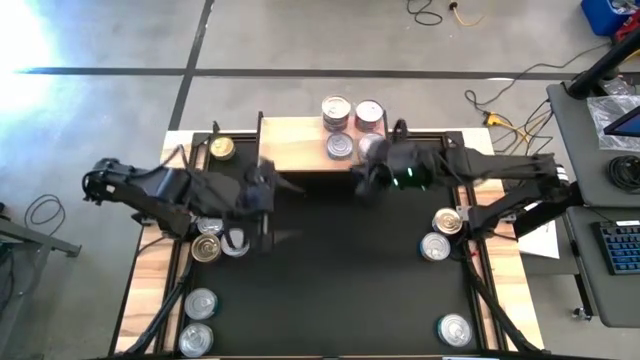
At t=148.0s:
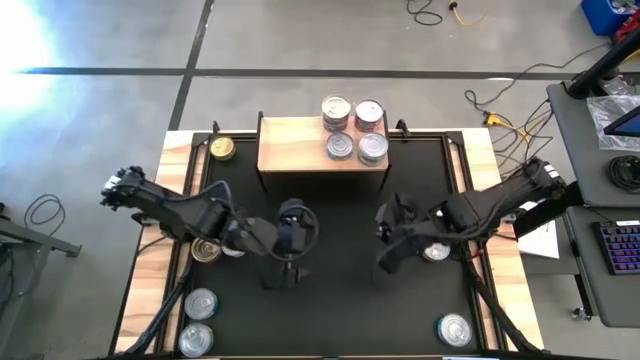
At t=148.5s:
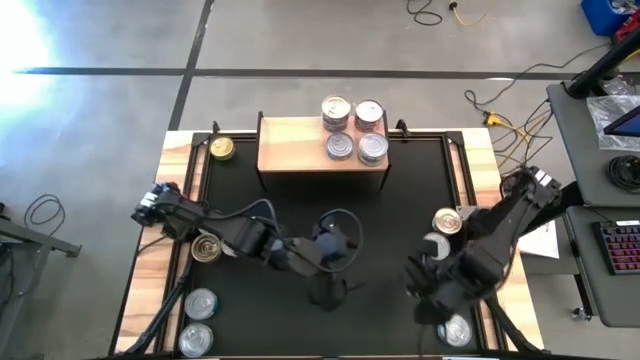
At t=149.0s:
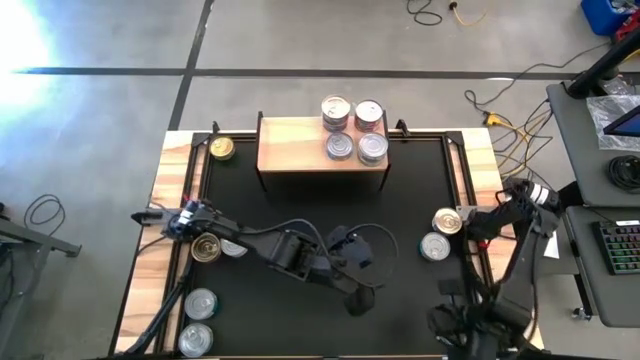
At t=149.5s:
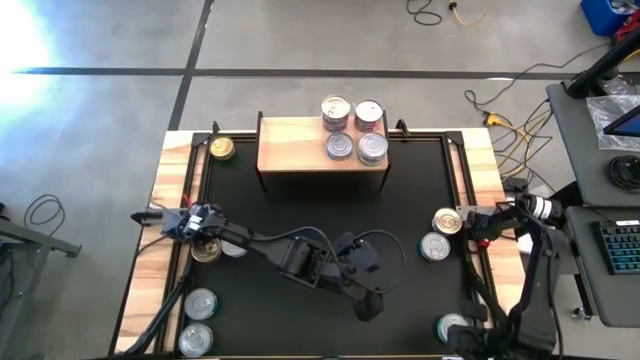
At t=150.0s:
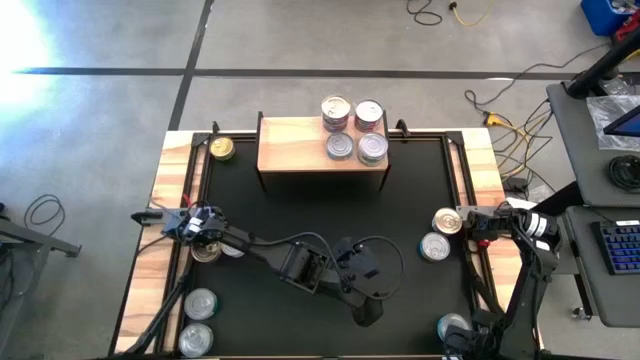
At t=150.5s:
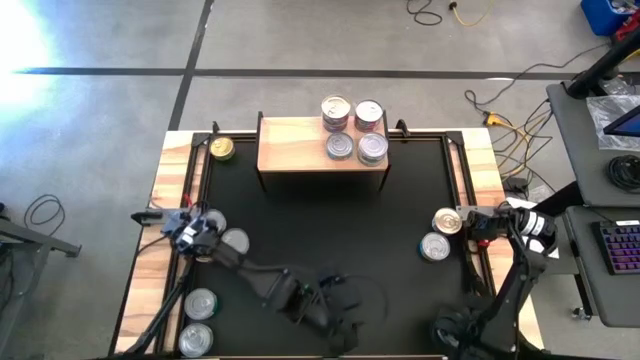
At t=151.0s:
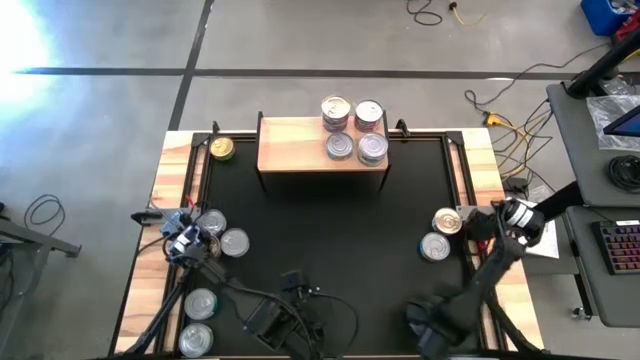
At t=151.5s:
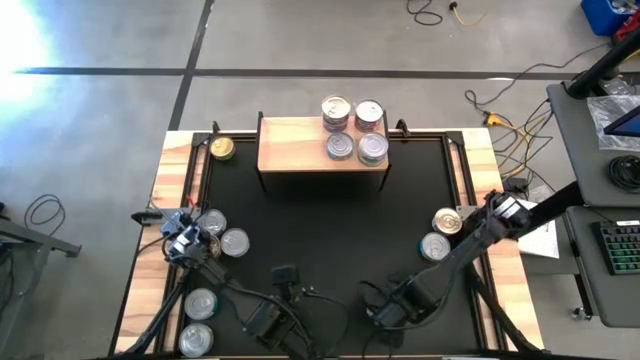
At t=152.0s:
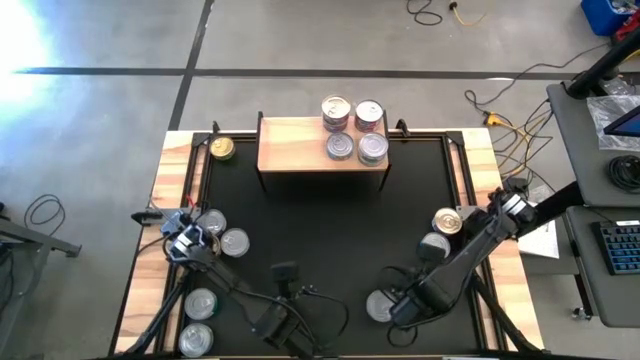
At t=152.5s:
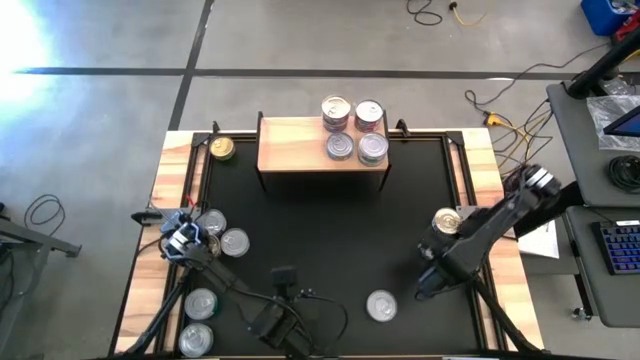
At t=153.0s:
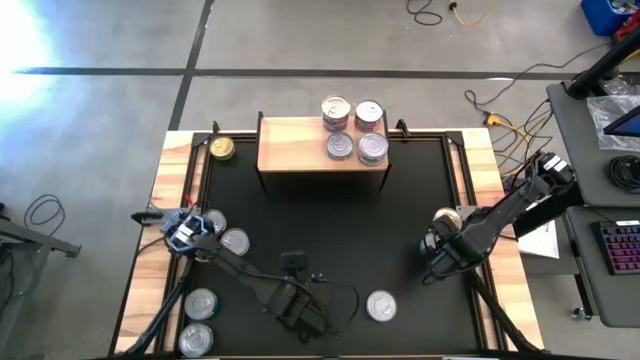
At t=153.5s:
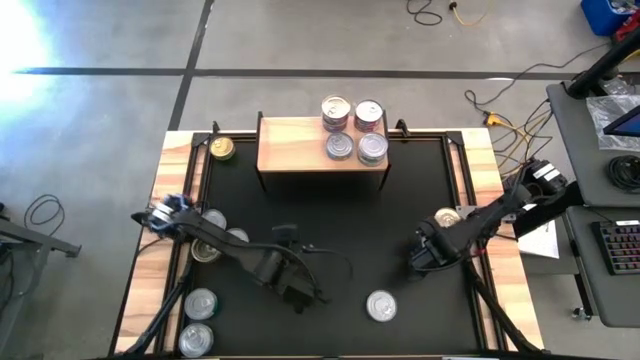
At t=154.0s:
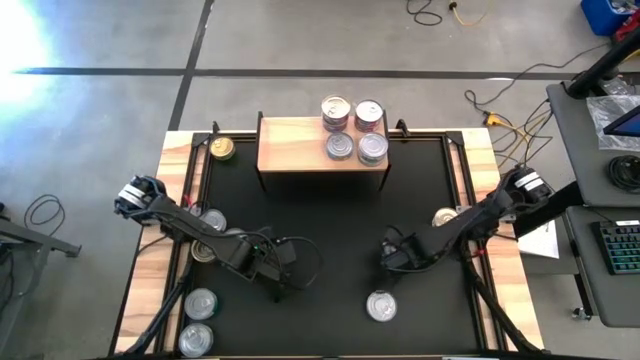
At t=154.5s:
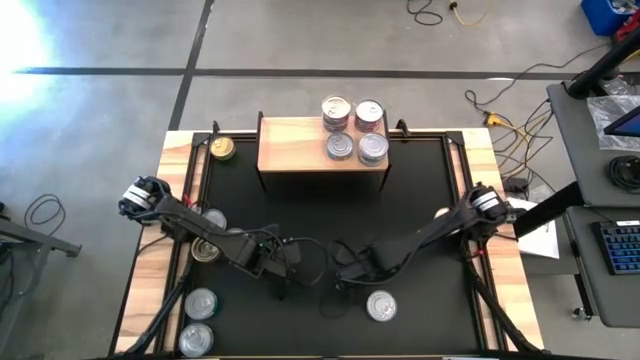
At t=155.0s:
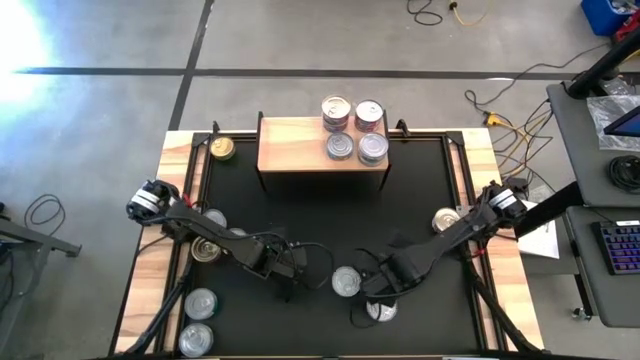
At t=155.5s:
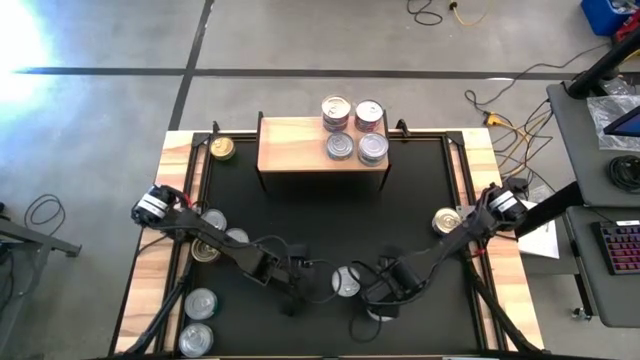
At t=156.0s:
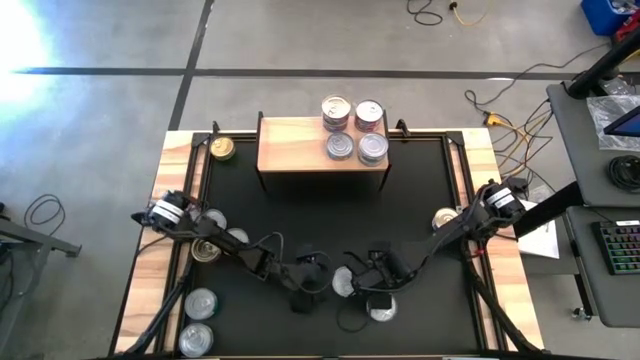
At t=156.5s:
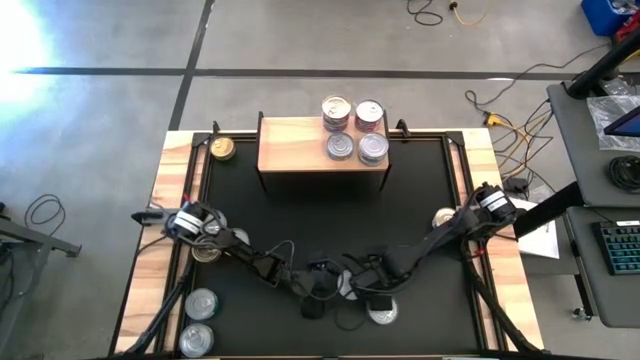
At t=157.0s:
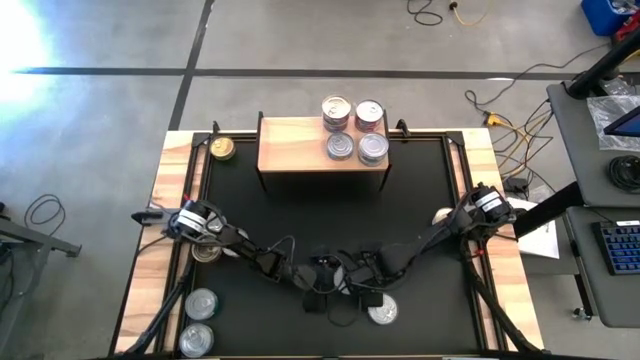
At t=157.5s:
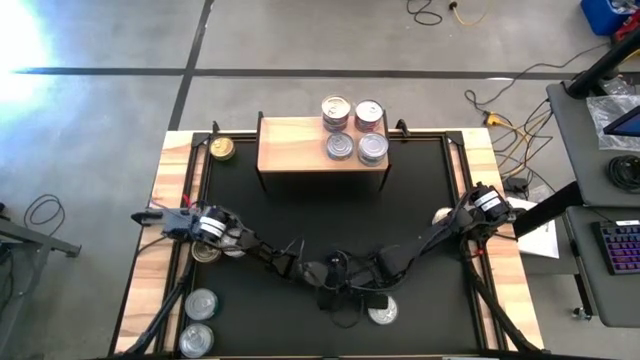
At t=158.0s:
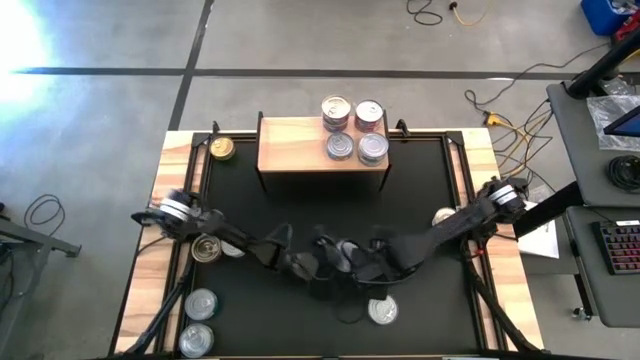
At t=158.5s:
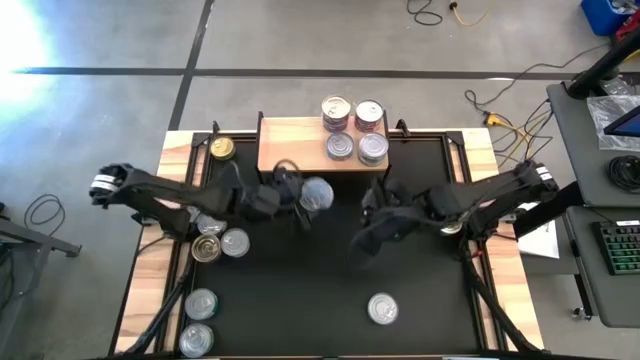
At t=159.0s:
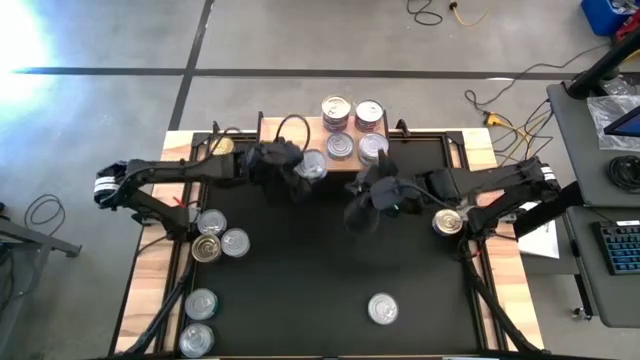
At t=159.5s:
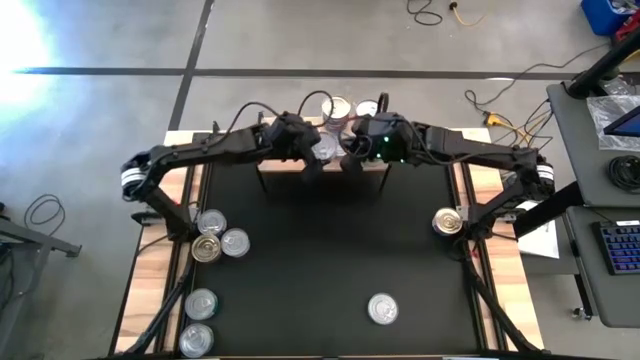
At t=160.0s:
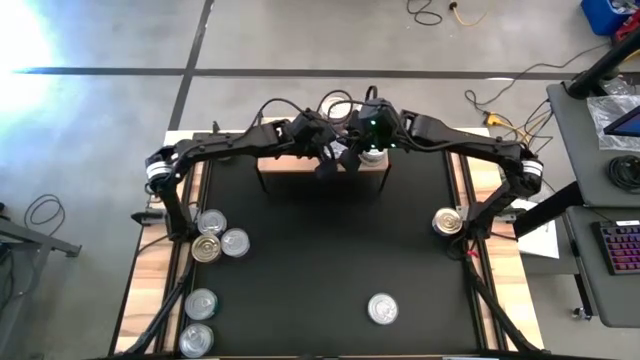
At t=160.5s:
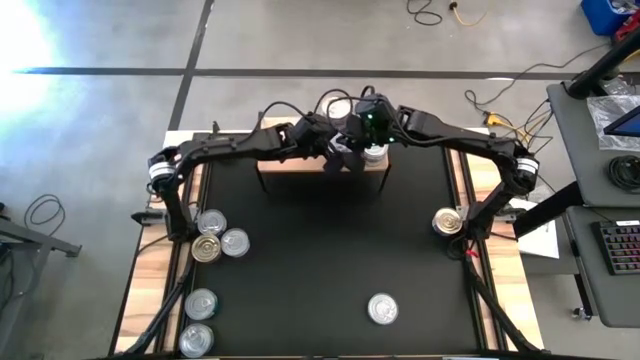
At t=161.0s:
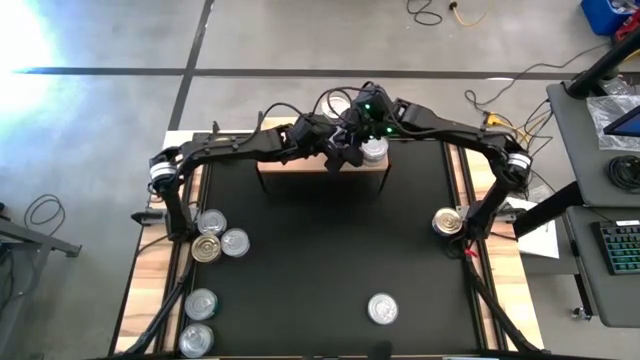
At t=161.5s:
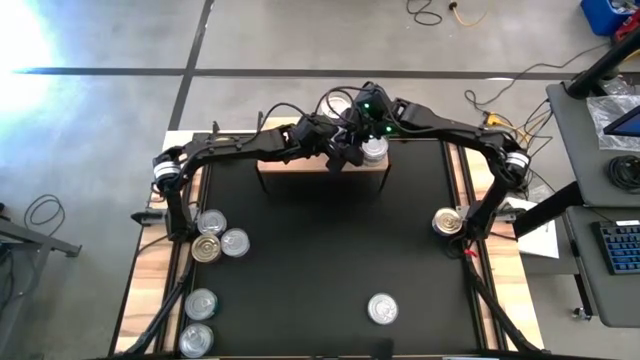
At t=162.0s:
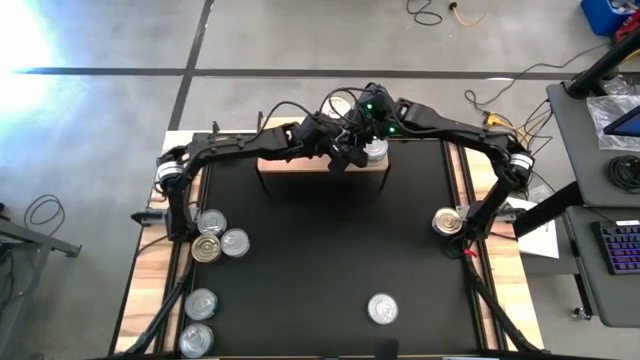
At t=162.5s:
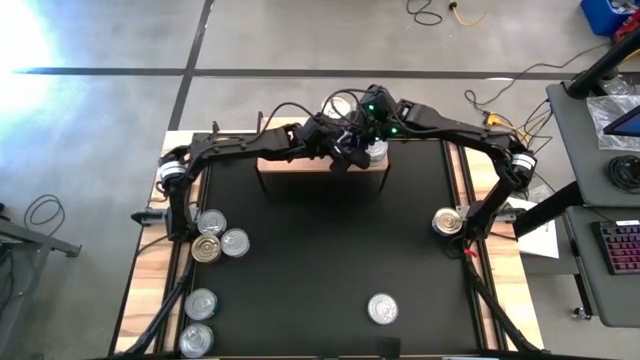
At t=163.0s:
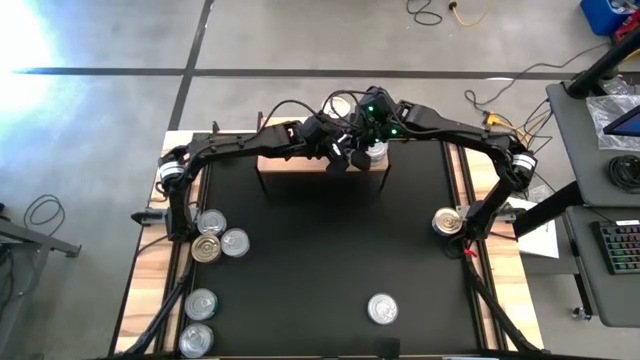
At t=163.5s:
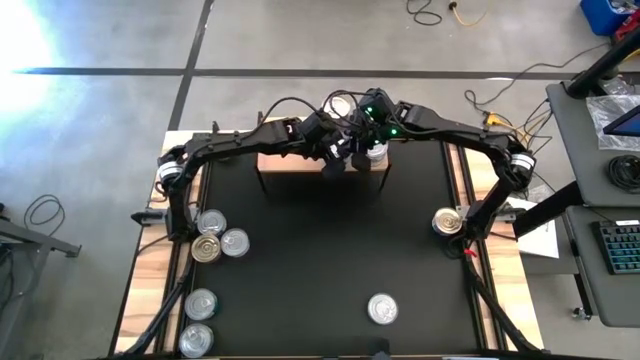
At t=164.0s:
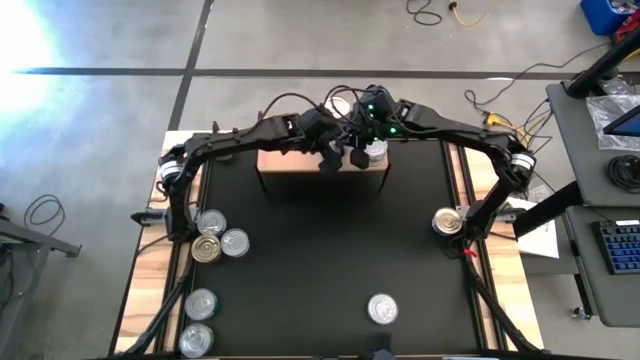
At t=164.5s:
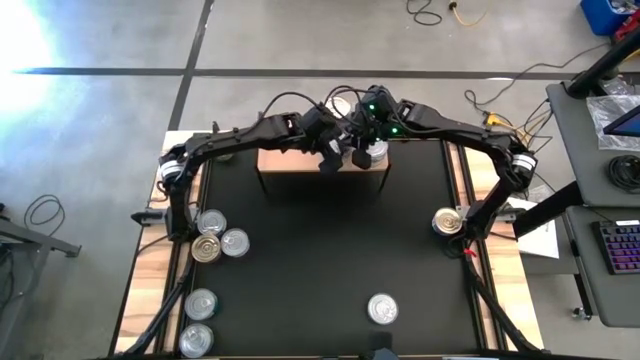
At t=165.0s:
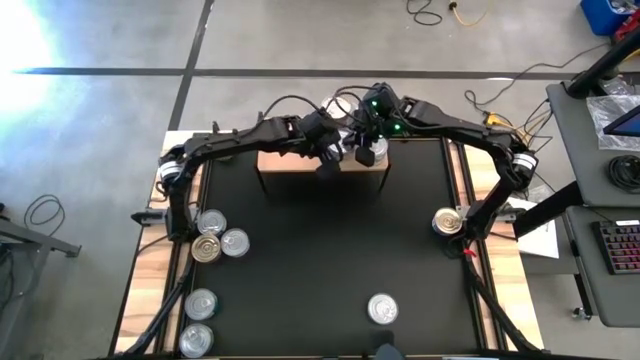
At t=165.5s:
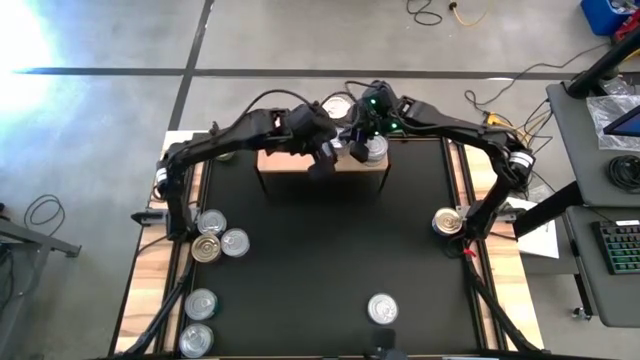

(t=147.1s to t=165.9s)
Task: Stack canned seafood by type on shelf
Stack the yellow-blue tuna can on top of the other yellow-blue tuna can on the shelf

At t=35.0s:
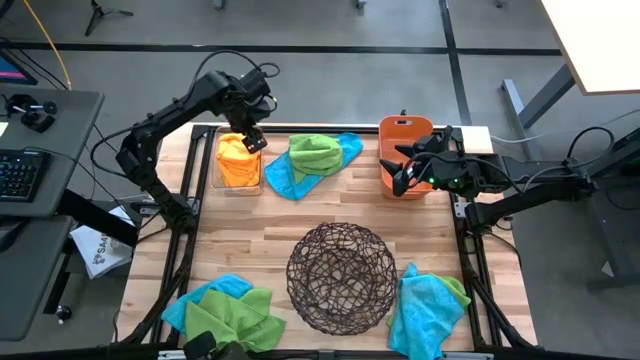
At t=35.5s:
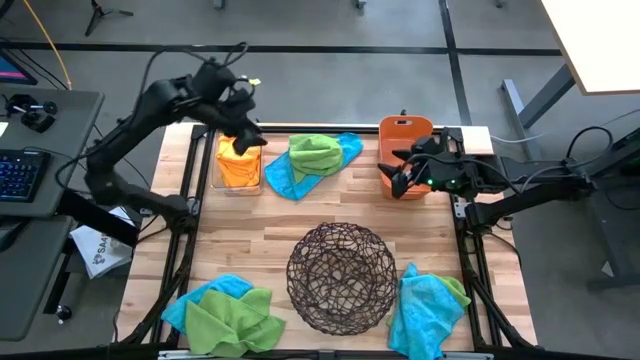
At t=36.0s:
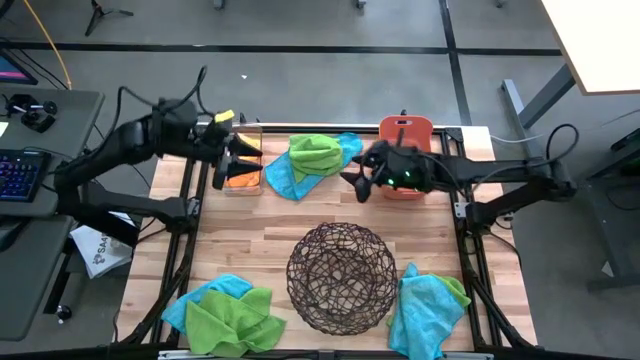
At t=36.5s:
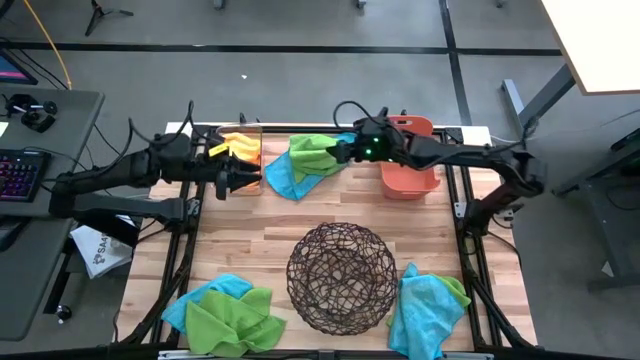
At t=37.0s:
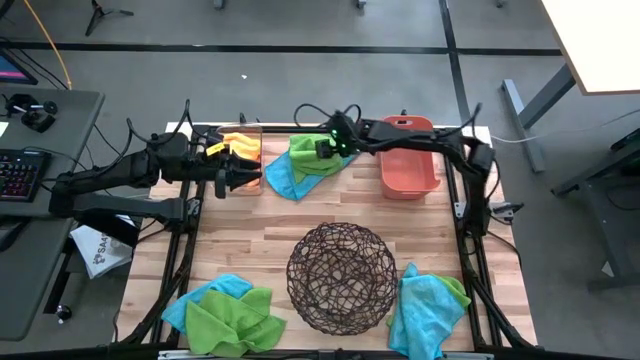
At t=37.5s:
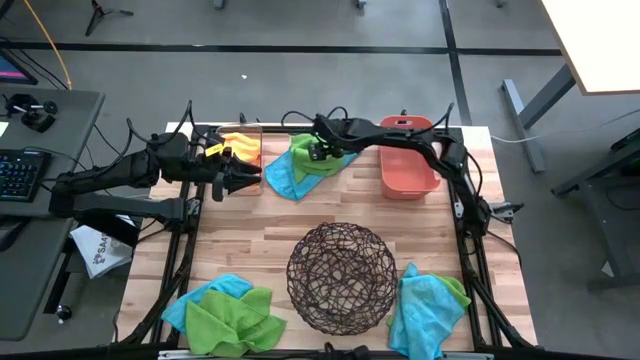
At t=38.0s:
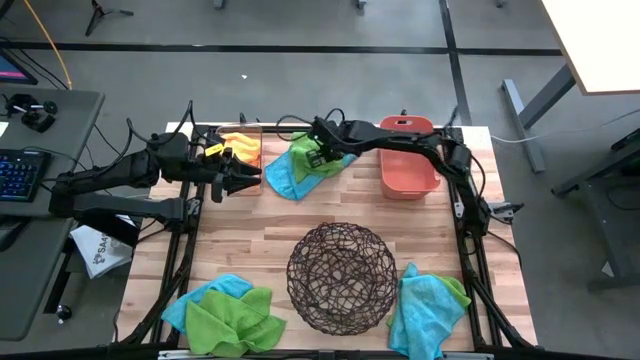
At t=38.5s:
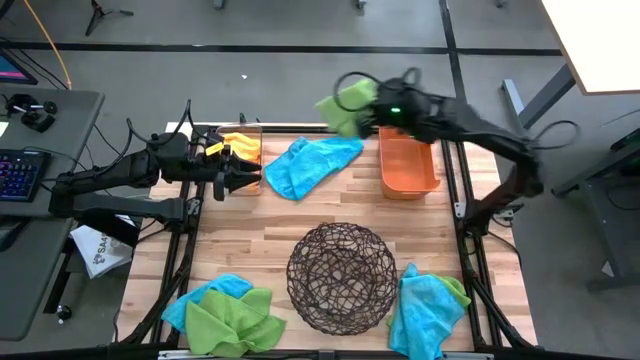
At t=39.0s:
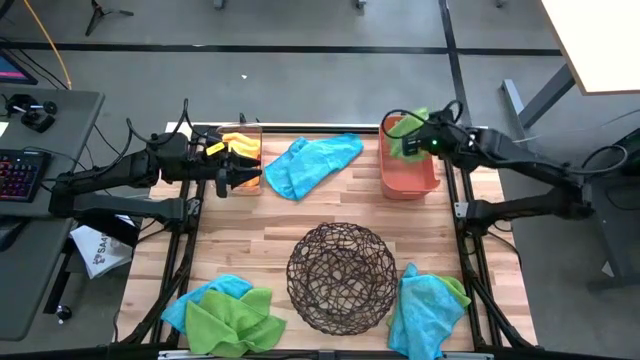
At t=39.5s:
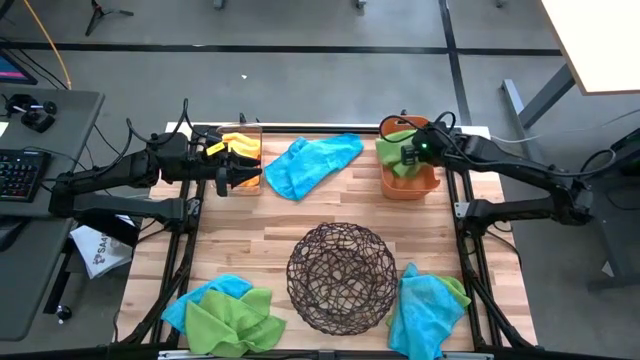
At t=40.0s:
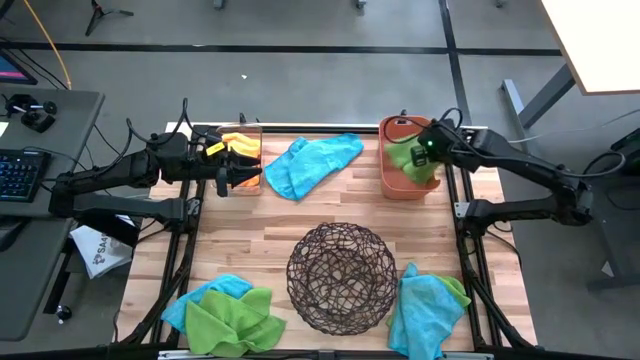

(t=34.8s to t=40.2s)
Task: Sort microfiber towel by color & place in baskets
Put the top green towel into the orange bin
